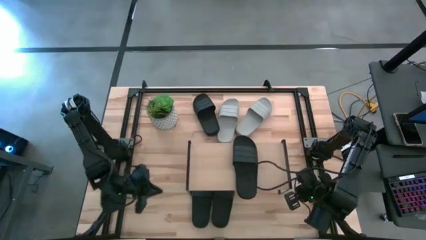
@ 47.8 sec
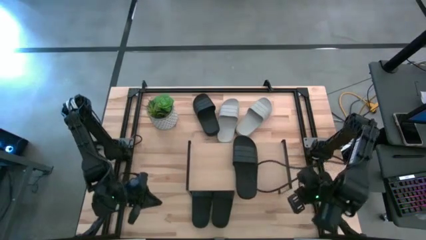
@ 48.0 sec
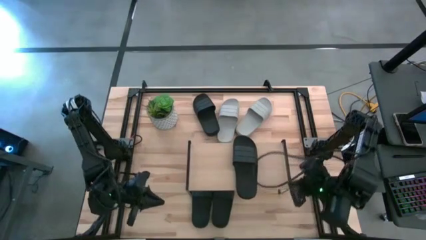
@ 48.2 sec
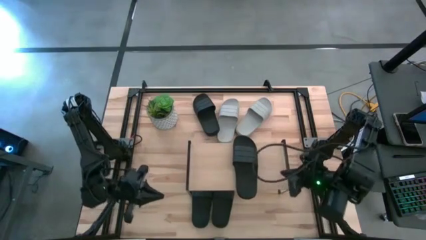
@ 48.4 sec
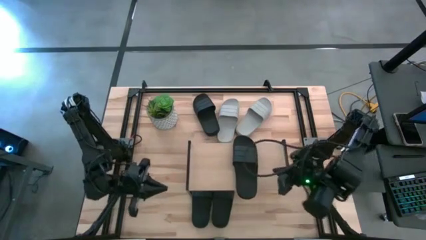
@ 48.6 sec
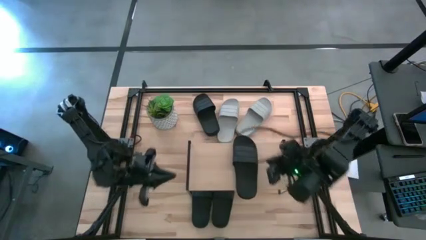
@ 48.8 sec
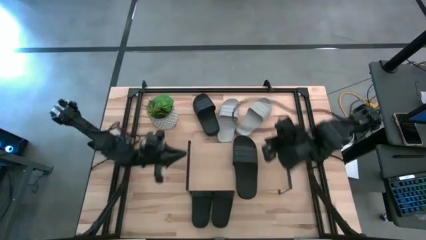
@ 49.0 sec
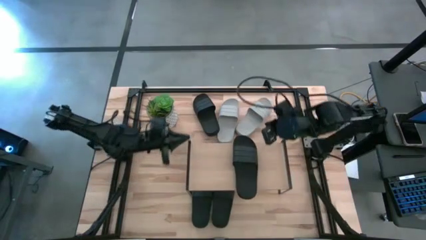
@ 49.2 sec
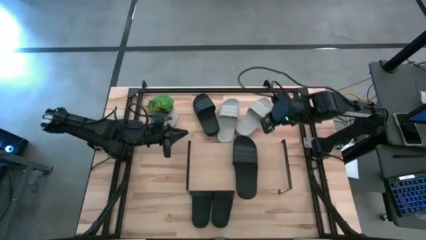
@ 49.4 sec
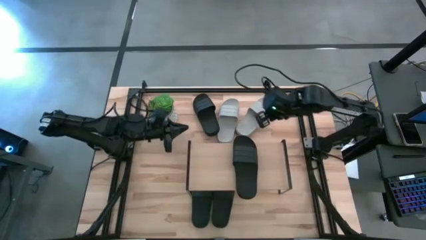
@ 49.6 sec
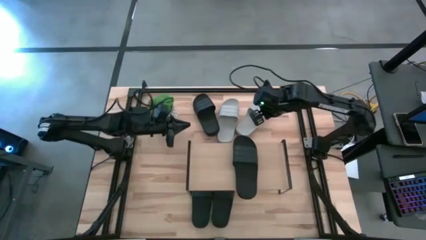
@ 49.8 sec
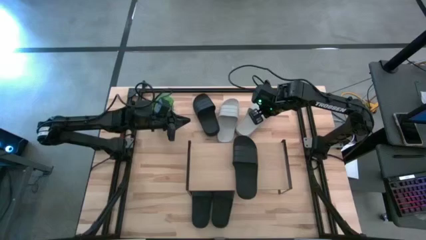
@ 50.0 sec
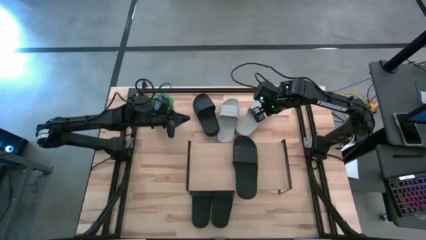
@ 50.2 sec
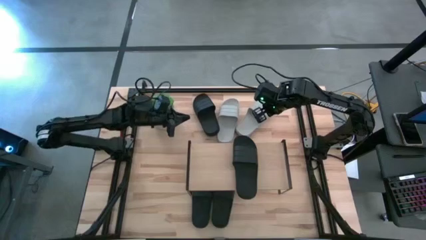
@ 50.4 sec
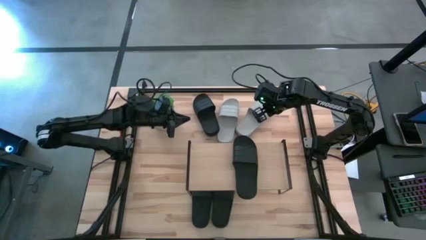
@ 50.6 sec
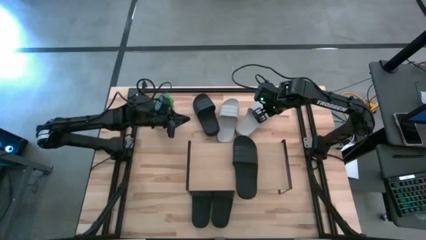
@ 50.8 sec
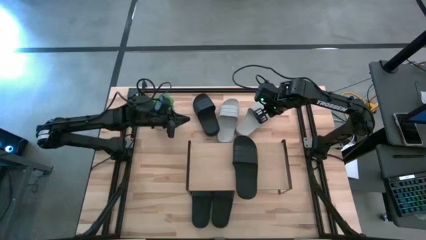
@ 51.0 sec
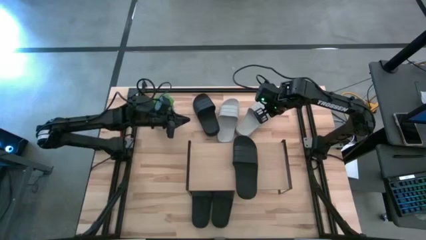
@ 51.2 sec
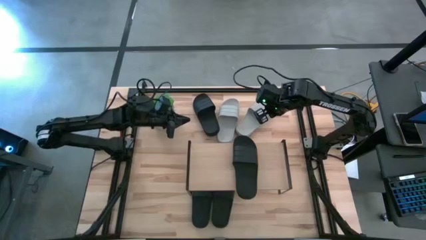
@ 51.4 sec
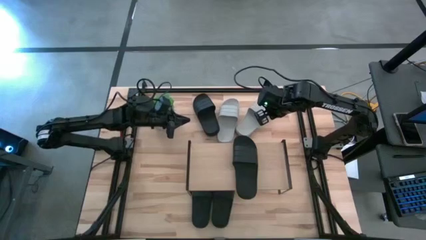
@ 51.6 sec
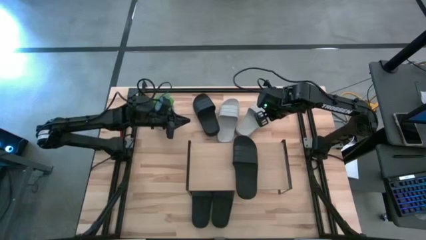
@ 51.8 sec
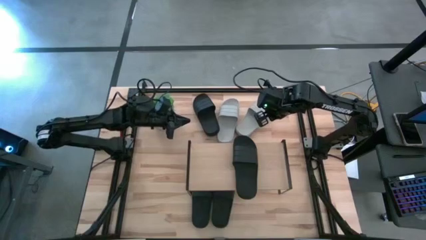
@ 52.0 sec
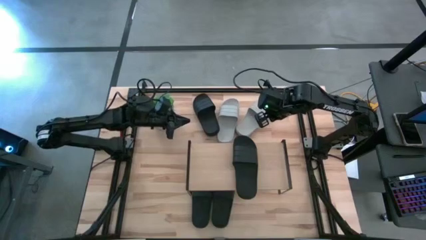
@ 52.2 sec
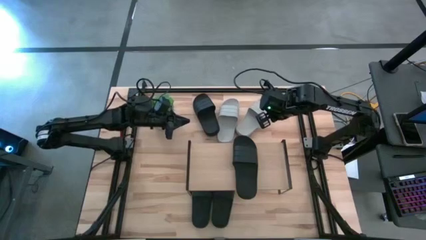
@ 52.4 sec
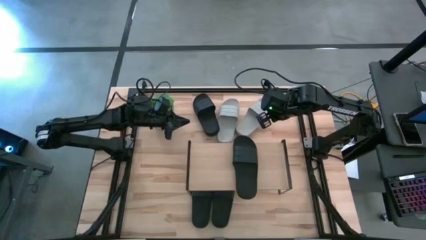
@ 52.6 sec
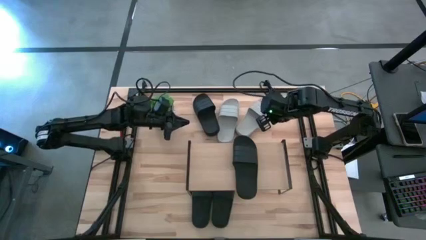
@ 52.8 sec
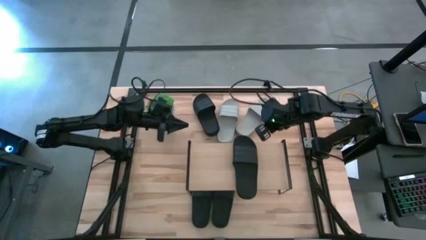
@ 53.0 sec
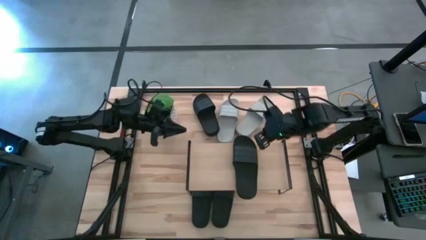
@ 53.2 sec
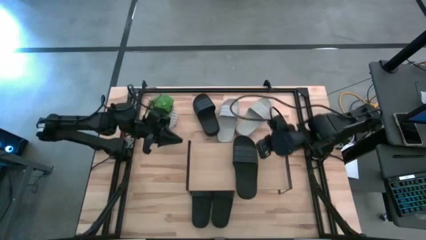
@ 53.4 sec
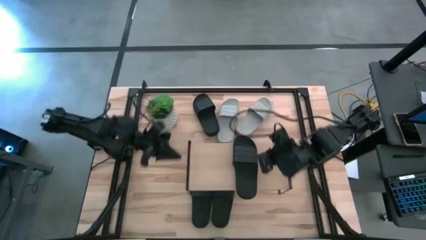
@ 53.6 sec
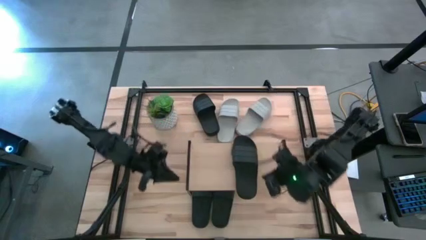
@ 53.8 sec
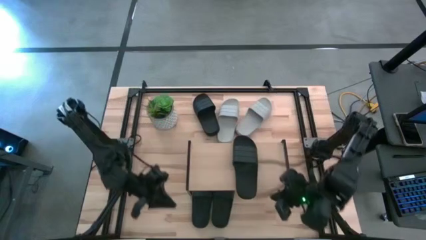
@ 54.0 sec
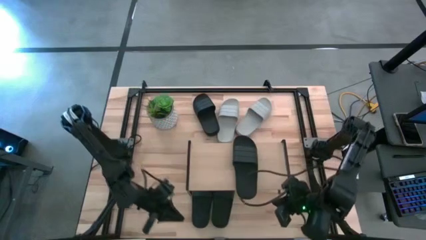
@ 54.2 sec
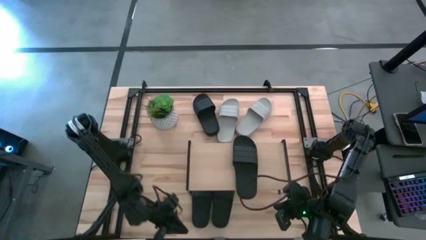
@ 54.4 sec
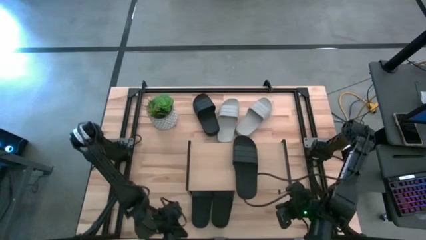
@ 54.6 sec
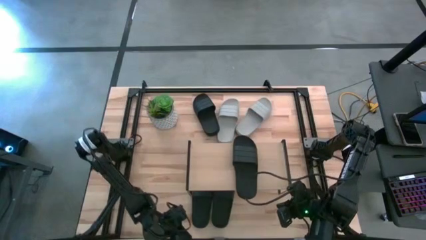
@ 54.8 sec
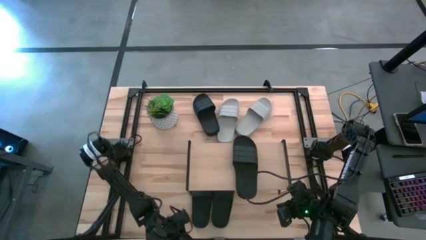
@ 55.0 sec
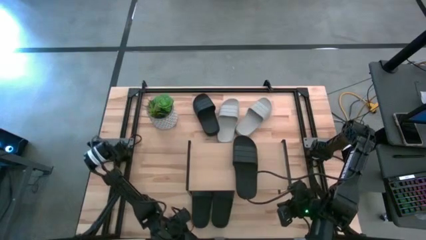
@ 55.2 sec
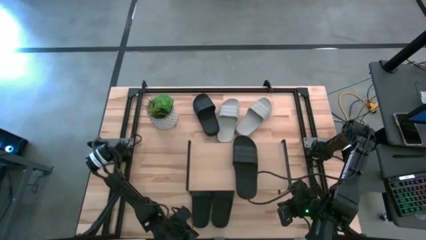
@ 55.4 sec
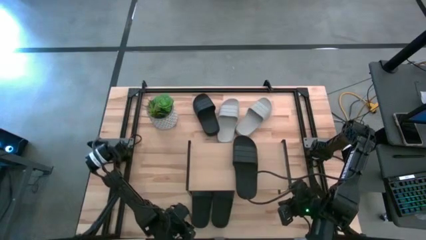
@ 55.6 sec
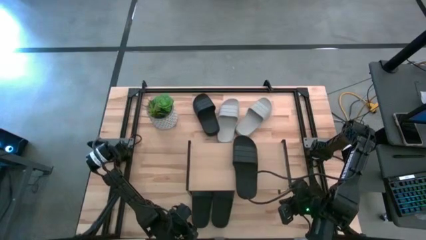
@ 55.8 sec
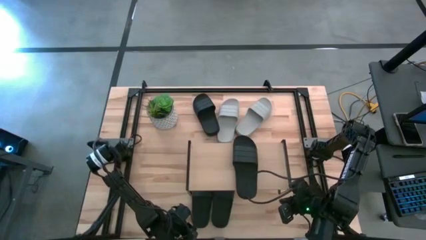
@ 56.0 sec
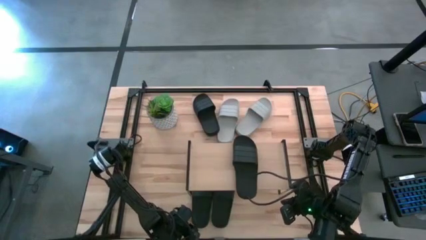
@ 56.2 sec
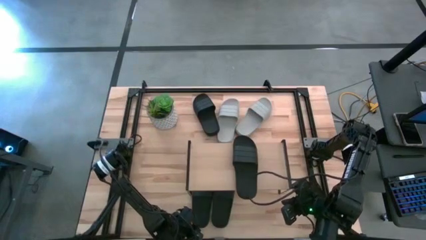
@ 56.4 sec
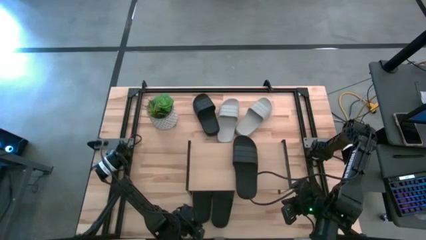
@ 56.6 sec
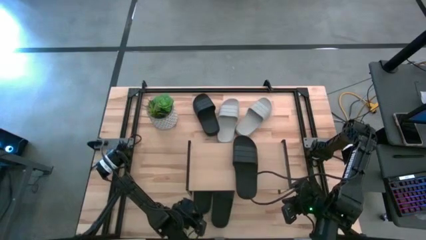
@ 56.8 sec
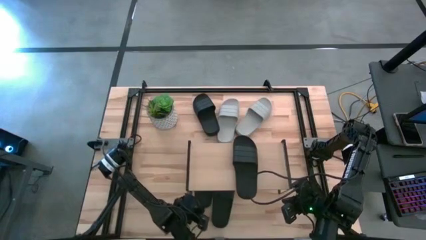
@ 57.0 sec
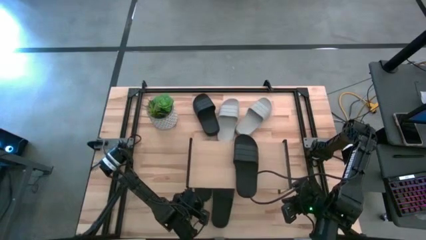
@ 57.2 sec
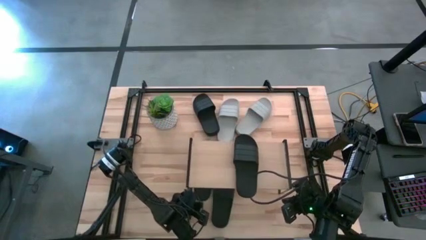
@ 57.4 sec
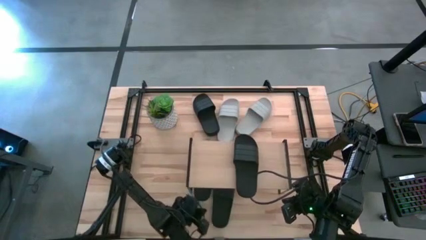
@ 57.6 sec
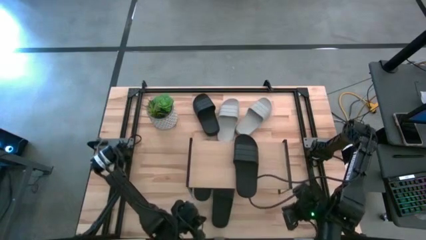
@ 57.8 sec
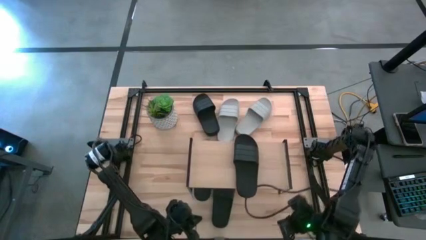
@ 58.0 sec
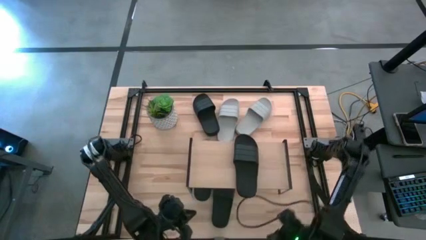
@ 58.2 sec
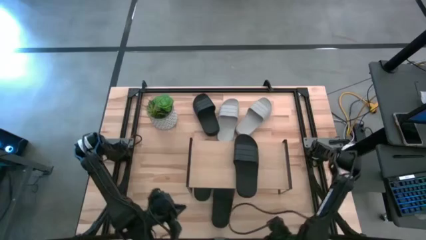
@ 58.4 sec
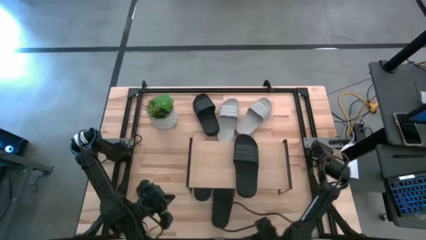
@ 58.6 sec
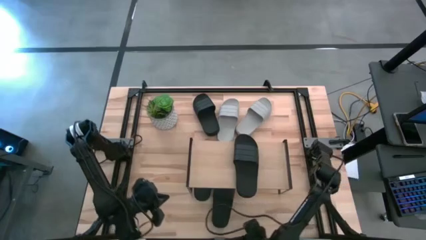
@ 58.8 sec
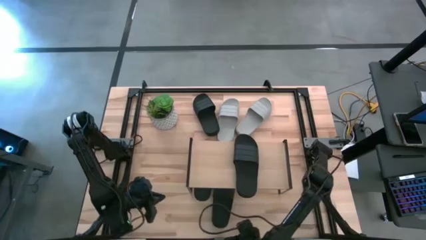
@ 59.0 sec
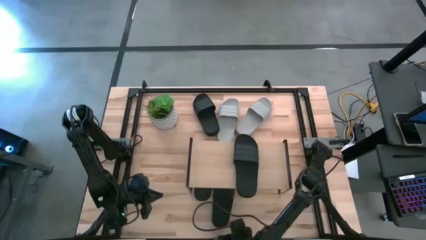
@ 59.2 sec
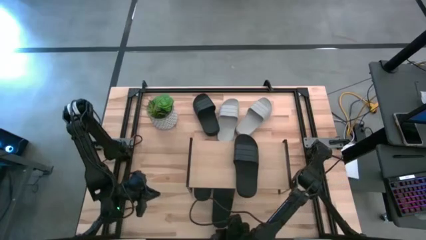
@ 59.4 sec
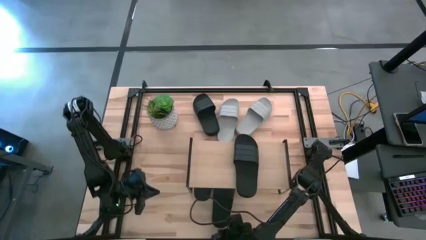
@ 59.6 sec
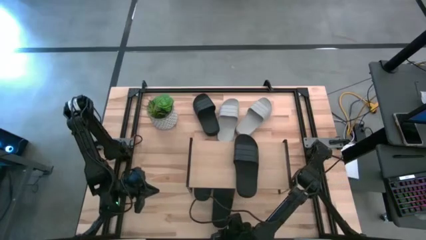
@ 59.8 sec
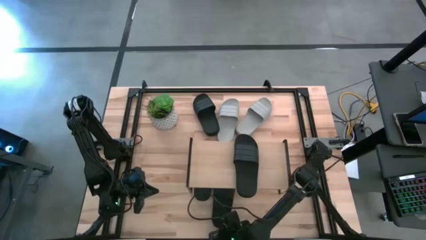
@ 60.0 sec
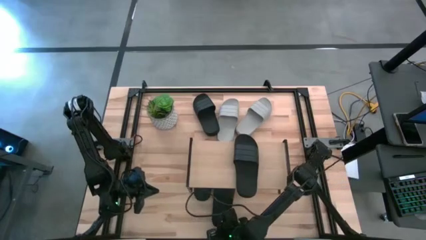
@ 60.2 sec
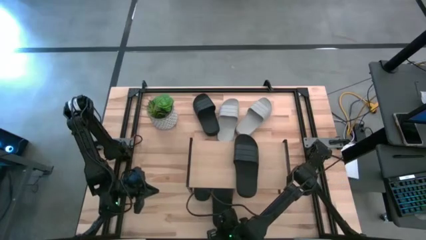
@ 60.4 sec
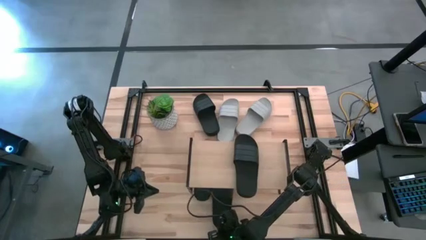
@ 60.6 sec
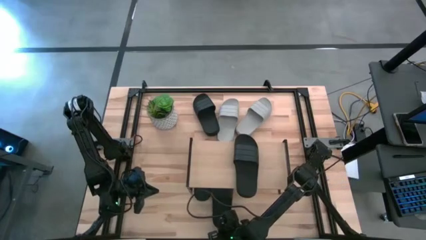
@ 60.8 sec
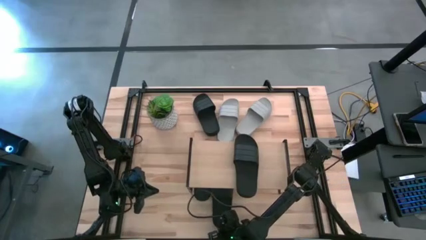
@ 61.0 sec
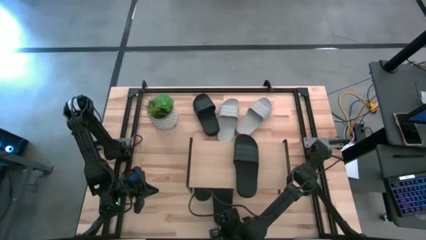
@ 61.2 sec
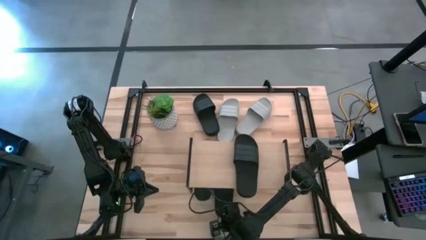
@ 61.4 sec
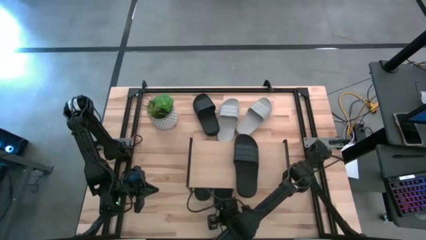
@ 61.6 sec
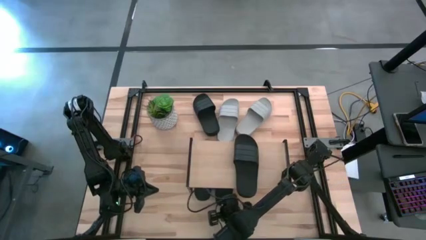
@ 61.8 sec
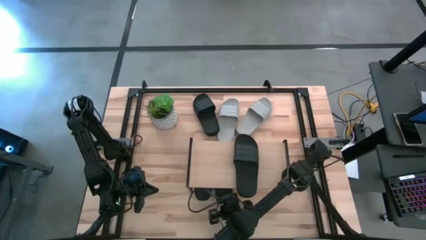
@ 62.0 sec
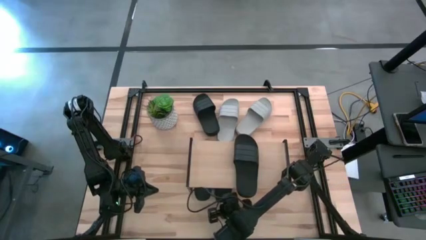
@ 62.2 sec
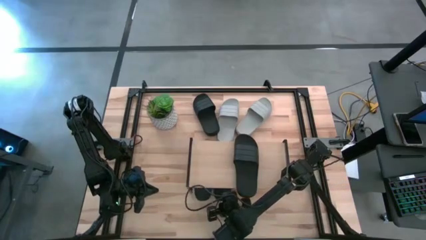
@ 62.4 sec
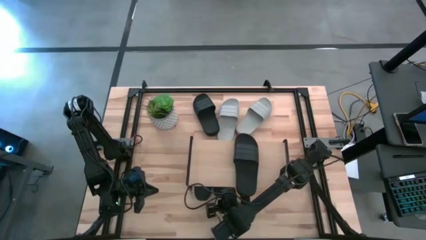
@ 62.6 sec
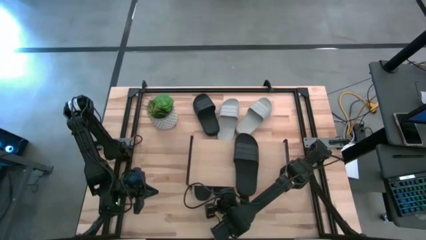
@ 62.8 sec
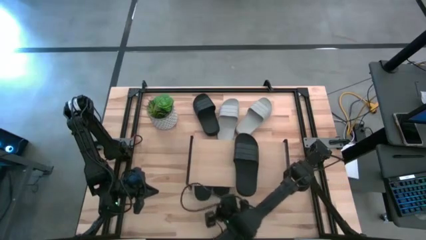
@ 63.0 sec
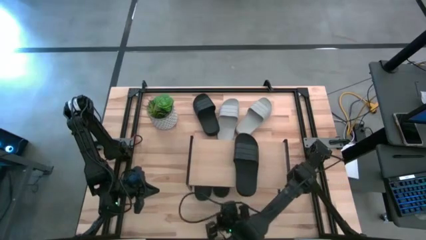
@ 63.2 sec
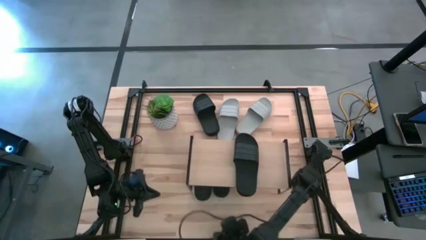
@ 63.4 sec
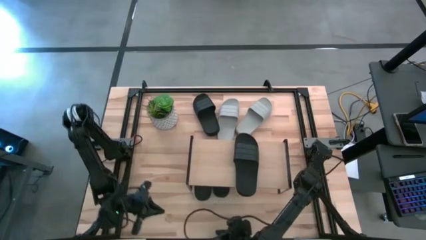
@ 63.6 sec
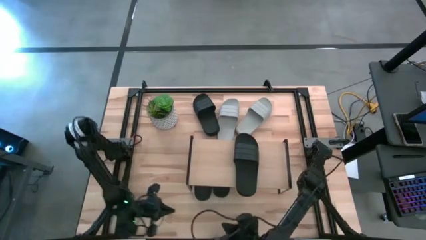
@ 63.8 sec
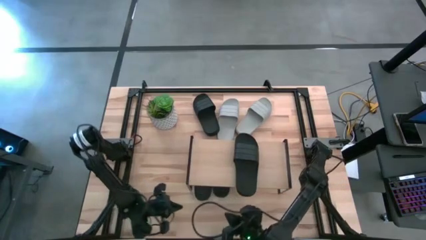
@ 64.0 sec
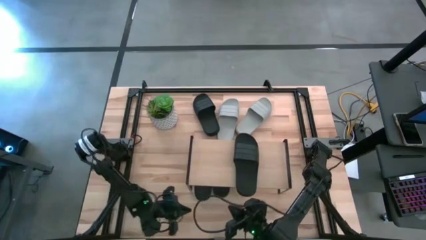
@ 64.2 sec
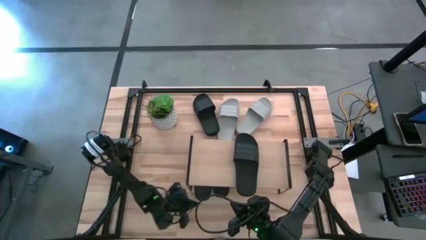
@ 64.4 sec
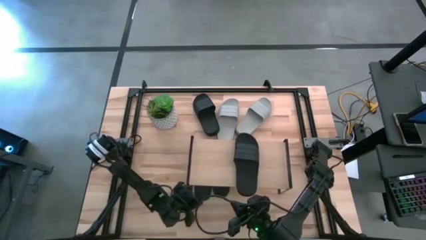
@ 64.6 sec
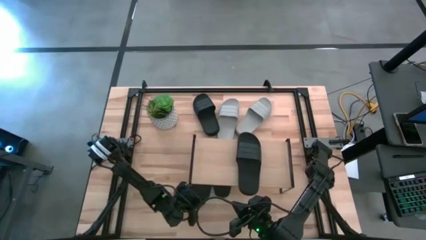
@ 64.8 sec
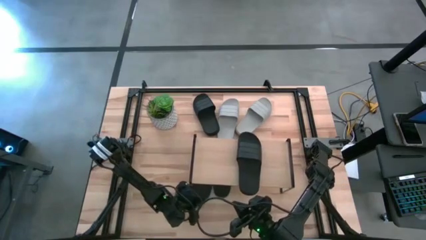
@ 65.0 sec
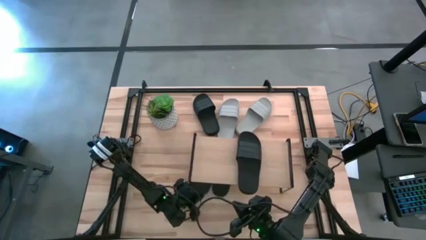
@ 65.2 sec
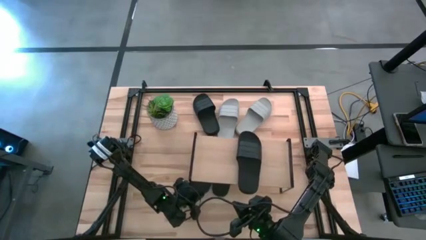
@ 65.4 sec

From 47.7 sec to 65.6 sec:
Task: Pick and place slides into the shelf
Adjust the black slides under the shelf
